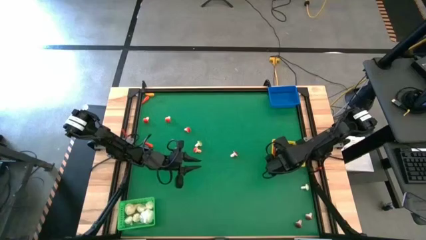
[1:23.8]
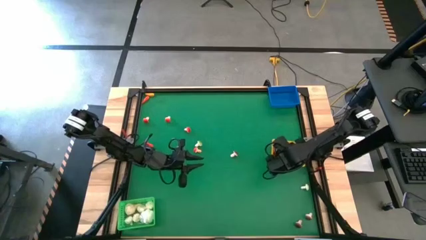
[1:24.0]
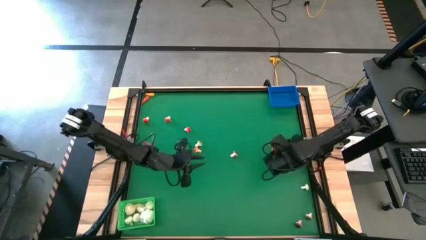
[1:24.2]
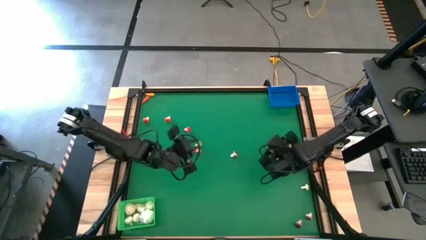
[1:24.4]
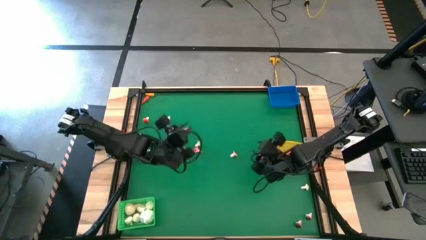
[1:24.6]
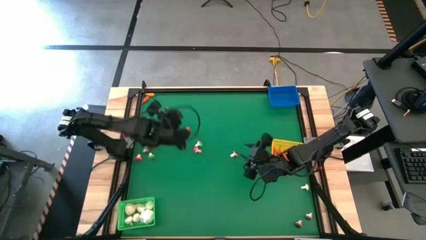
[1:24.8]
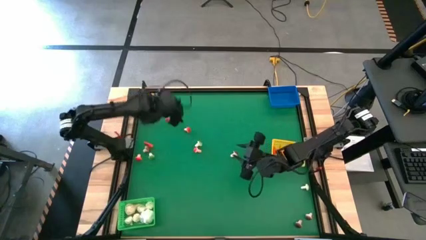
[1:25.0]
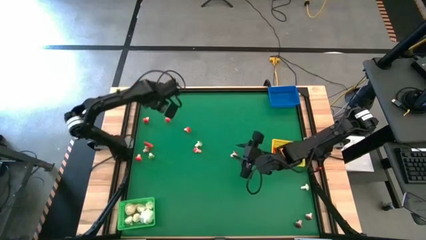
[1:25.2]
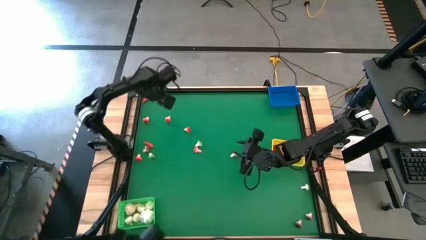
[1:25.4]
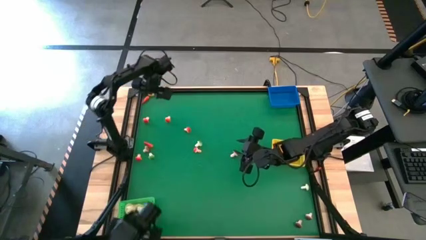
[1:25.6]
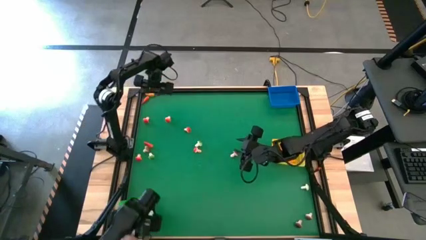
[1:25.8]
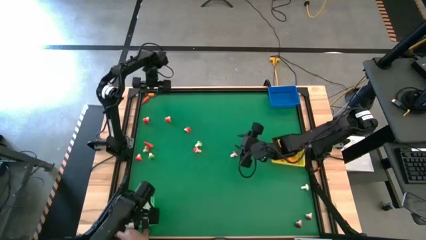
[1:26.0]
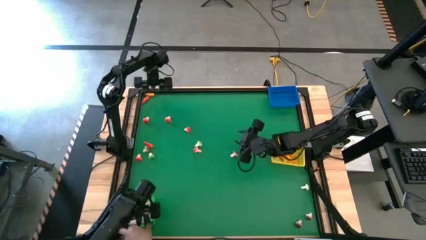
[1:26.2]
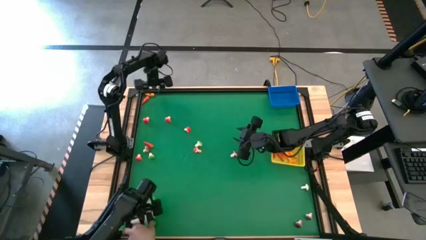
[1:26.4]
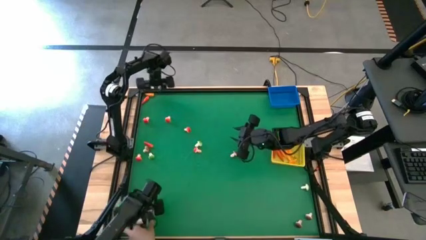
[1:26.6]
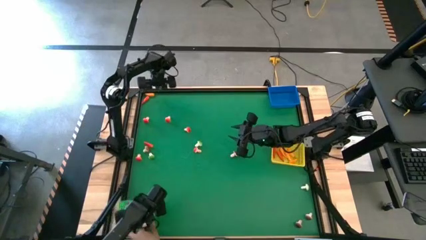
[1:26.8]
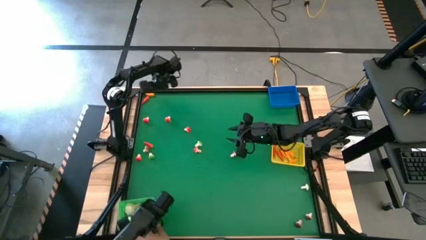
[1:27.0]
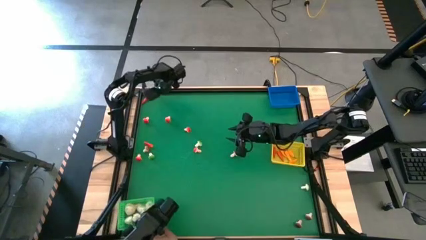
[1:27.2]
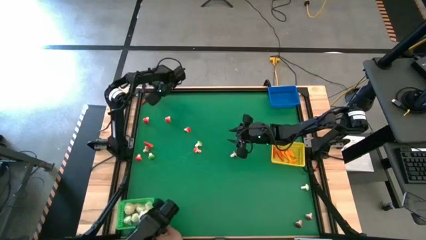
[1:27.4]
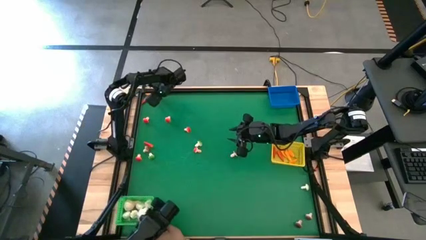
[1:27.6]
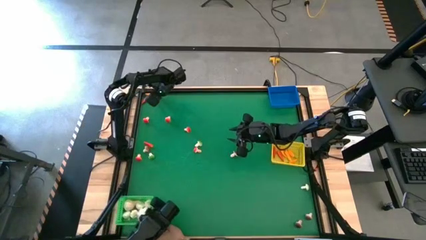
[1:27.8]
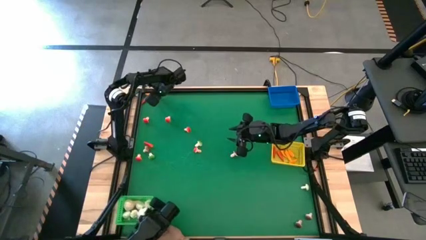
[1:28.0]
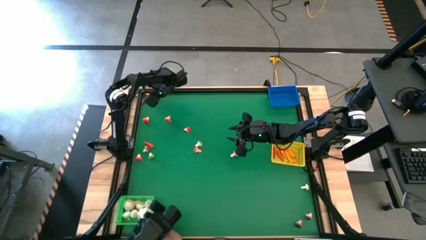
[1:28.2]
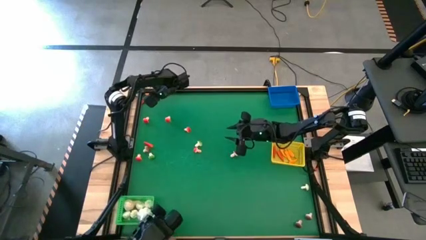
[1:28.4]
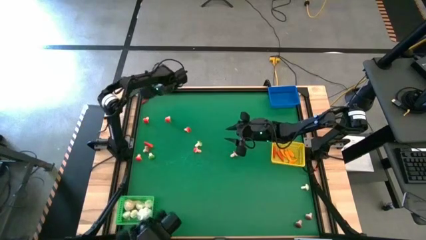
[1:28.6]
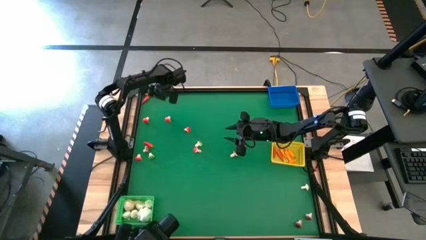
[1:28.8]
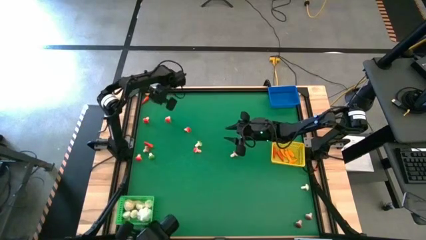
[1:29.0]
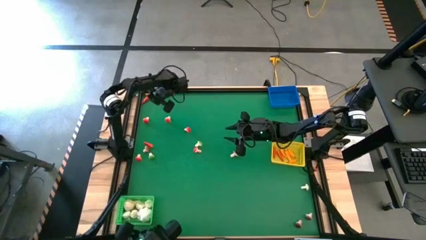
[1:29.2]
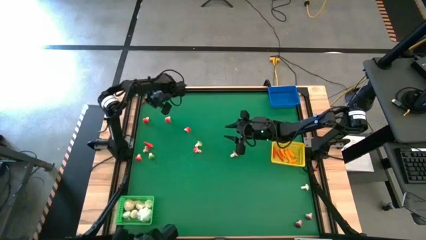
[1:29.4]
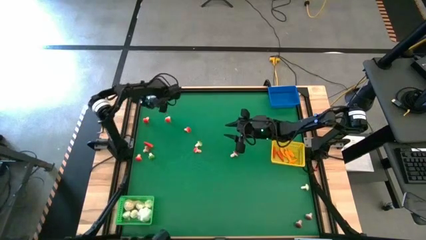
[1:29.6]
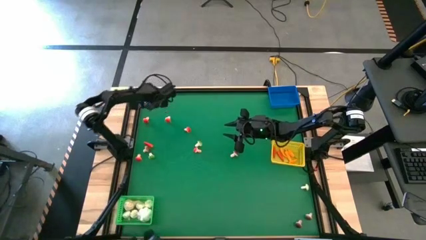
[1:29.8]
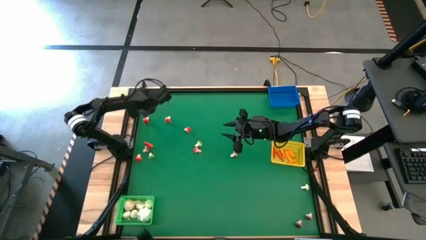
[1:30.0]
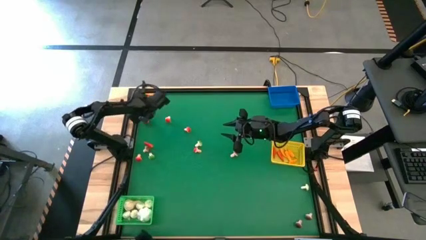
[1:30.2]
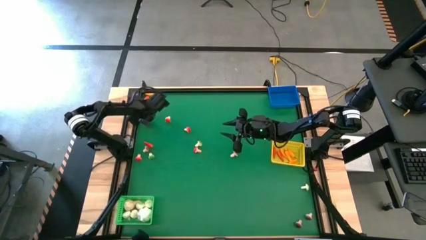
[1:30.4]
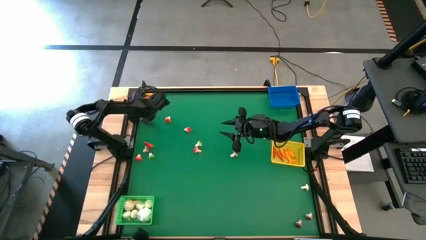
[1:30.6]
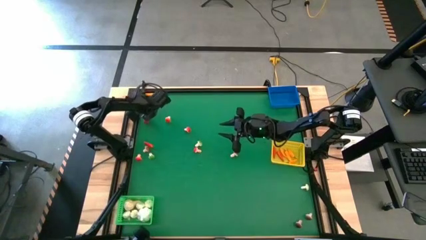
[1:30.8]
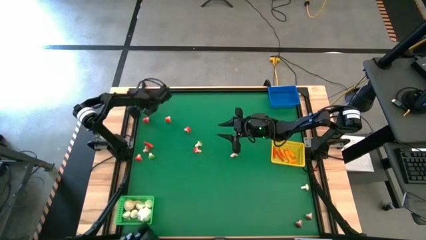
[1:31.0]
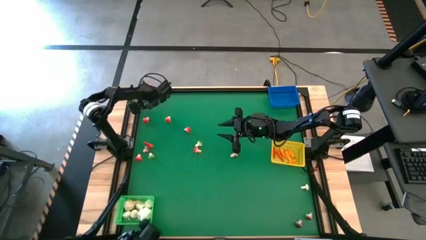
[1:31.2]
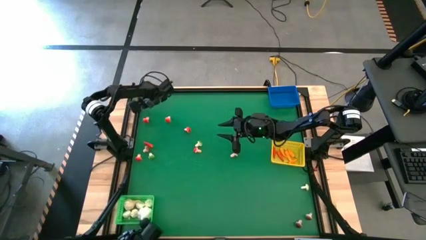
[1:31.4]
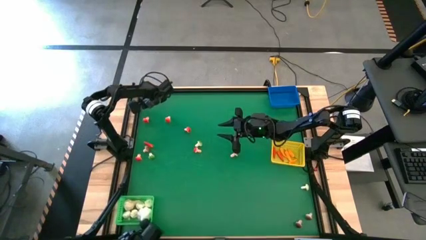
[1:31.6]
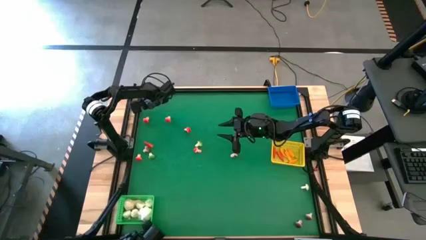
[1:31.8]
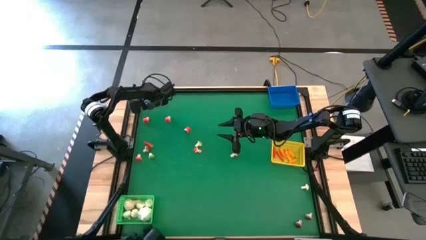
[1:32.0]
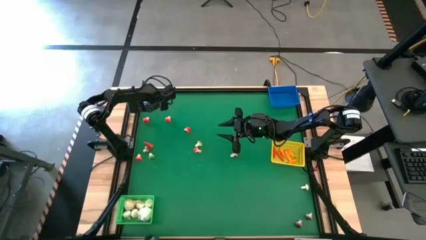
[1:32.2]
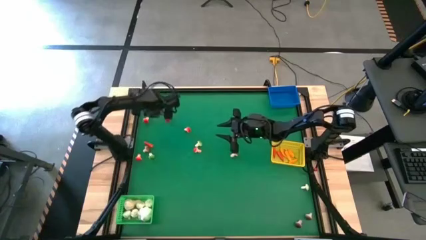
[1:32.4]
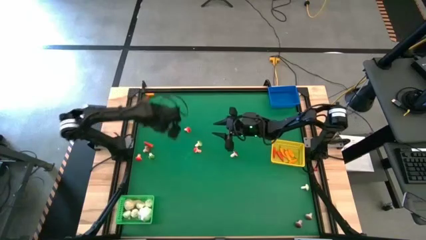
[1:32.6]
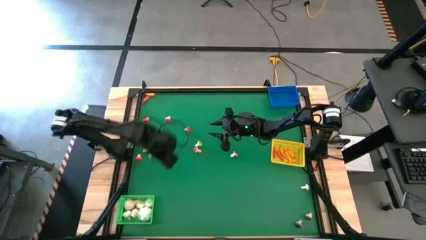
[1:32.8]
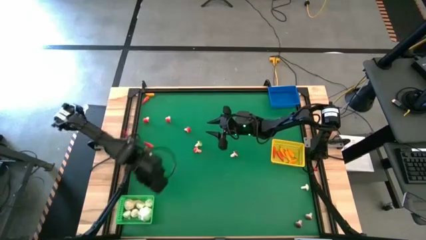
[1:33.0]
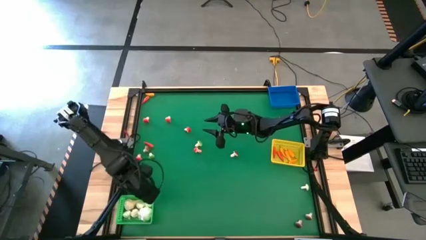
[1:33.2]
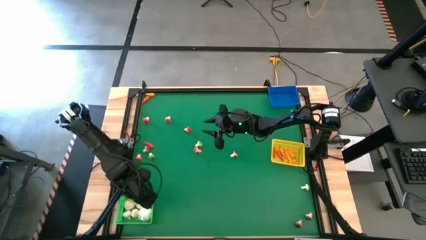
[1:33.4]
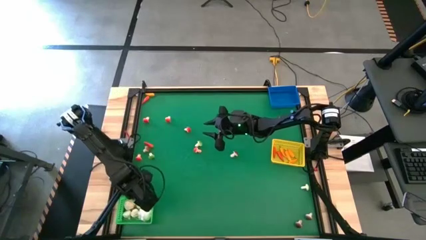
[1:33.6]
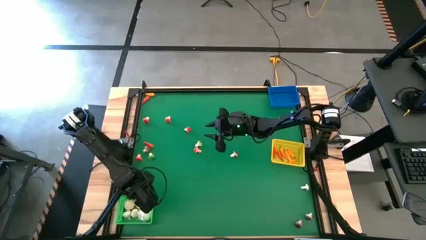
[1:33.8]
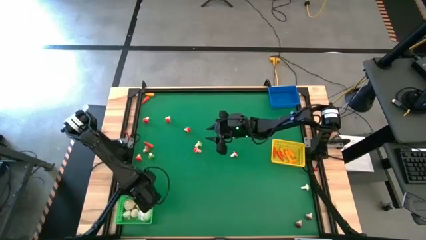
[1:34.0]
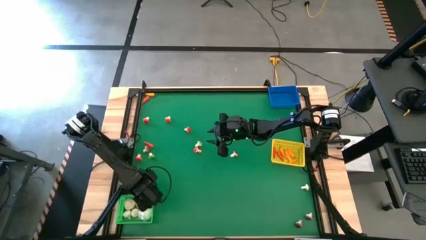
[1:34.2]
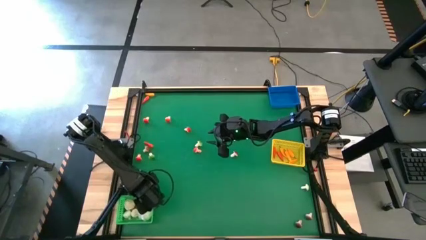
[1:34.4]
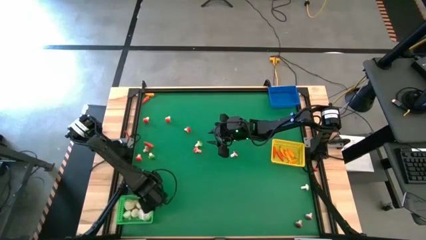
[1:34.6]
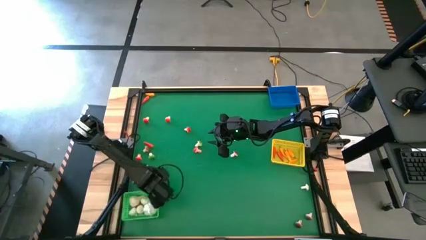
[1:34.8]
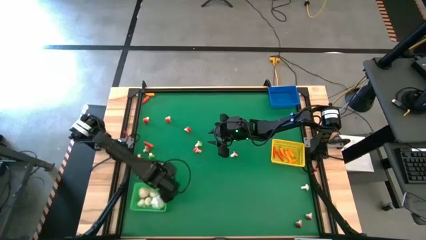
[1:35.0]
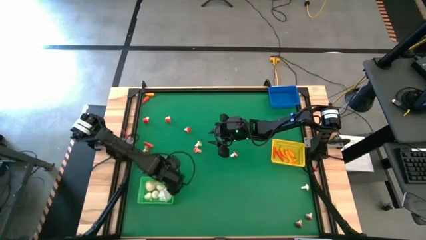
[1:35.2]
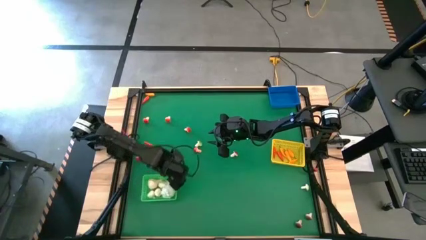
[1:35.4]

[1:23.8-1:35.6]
Task: Sort produce into baskets
Adjust the green bin on the table

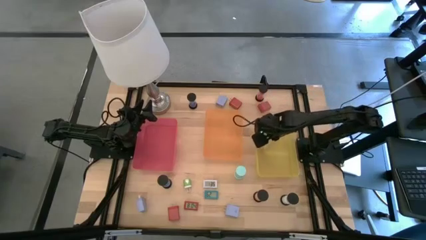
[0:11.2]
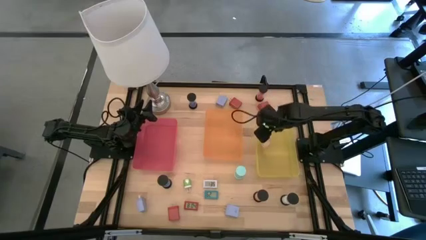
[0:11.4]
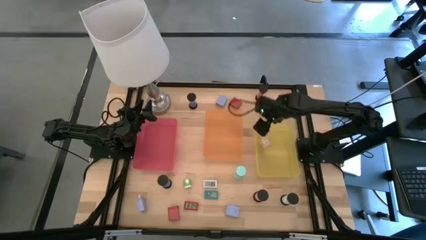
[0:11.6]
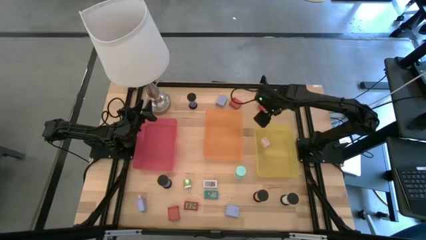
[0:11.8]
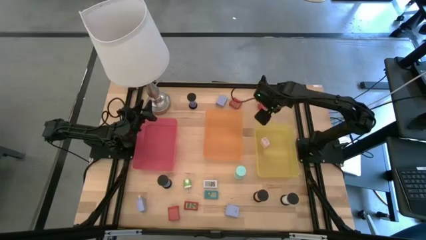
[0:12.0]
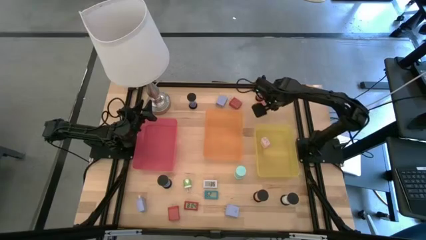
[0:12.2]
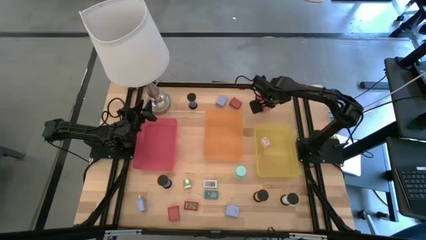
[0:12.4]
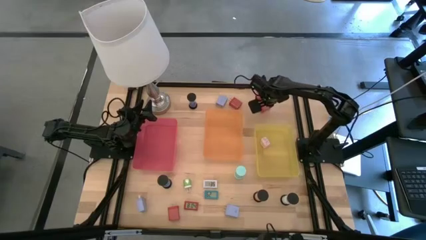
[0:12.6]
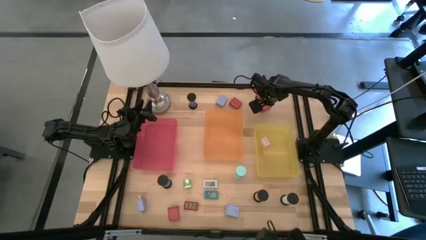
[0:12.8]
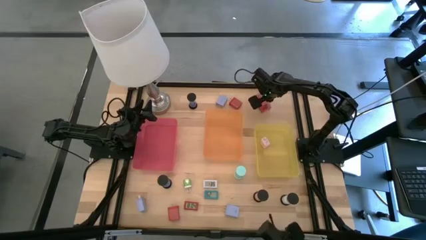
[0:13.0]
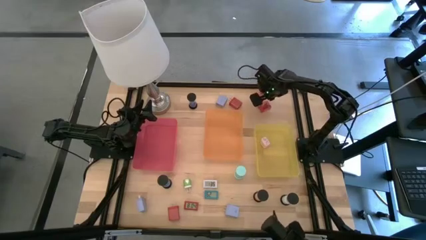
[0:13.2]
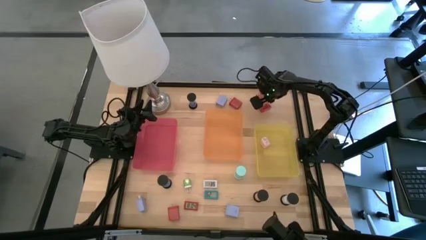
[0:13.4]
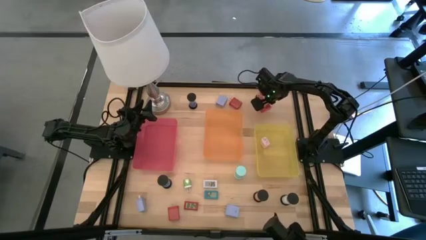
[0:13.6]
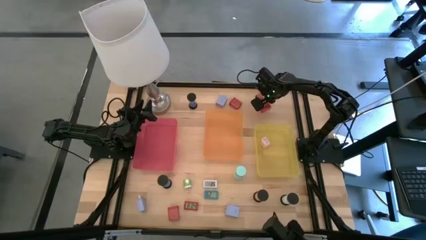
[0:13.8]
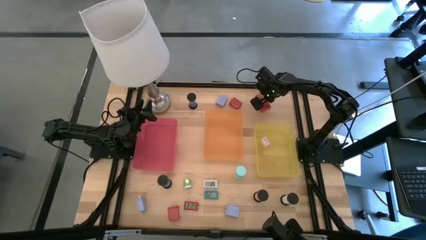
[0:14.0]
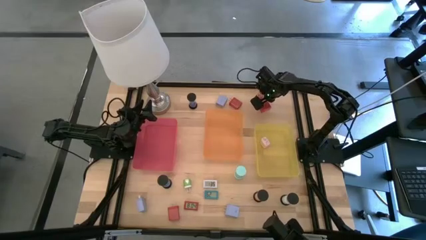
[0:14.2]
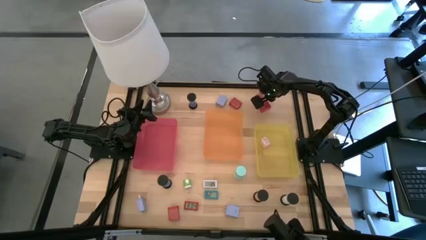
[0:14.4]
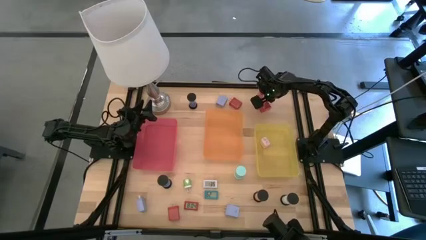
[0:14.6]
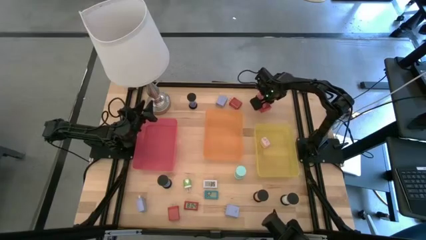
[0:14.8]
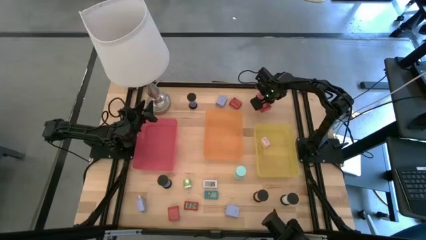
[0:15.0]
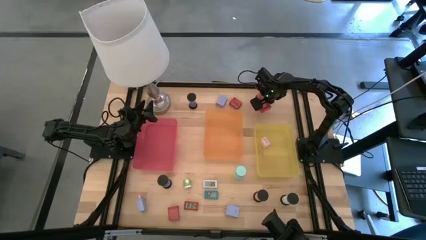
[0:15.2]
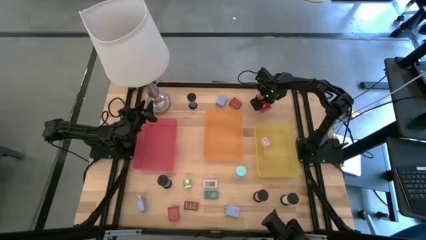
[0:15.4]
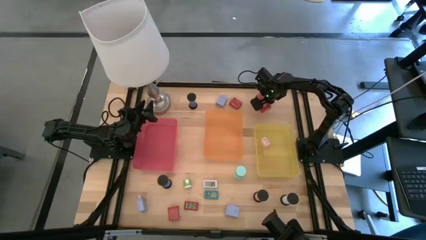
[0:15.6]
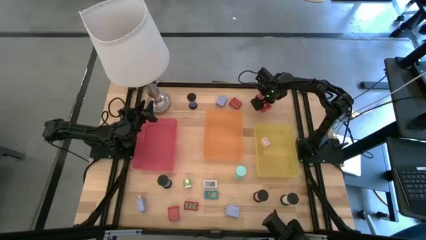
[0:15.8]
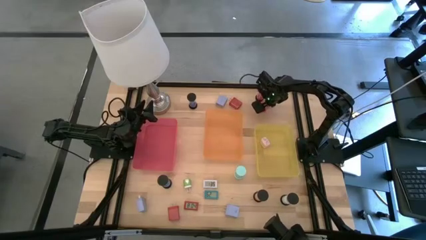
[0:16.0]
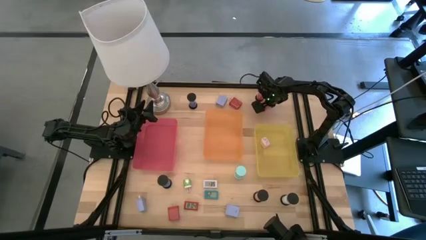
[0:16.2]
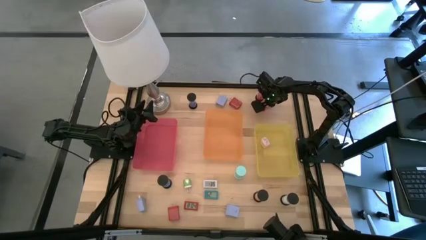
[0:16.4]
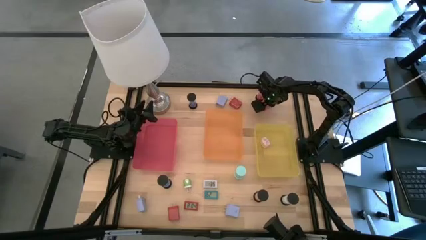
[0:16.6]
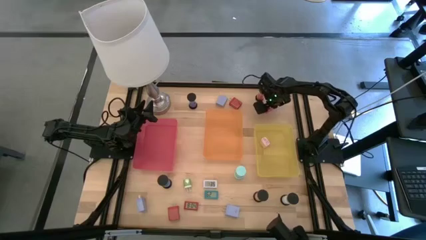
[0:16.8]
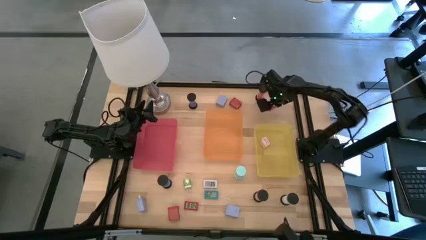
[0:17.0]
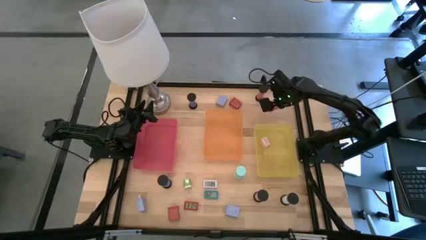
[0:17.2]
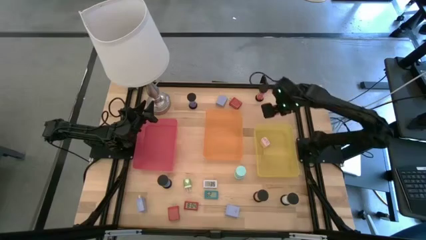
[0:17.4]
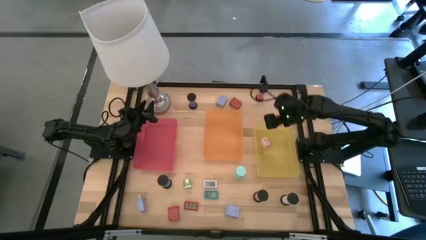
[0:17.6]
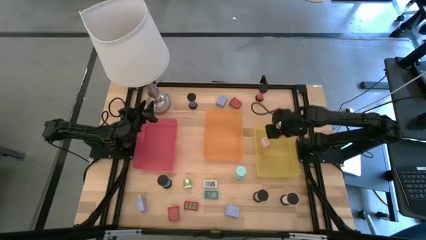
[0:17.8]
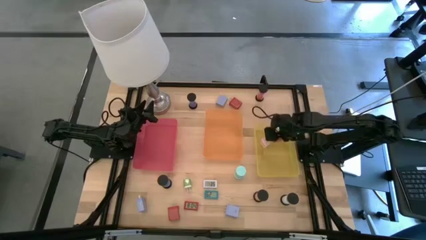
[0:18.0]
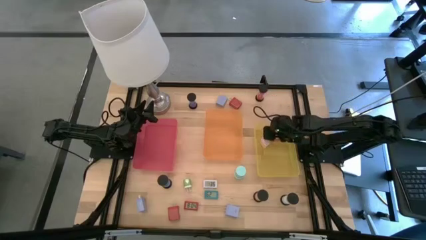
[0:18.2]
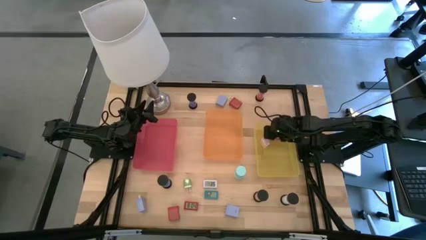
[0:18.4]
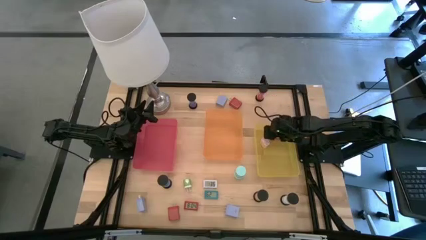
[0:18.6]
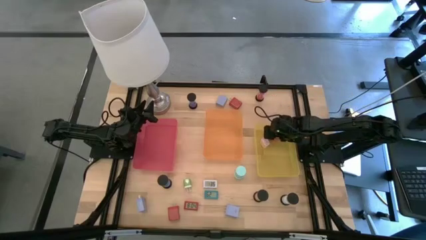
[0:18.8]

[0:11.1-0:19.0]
Task: Pick & Place Office items
Put the top right red charger adapter into the yellow bin
